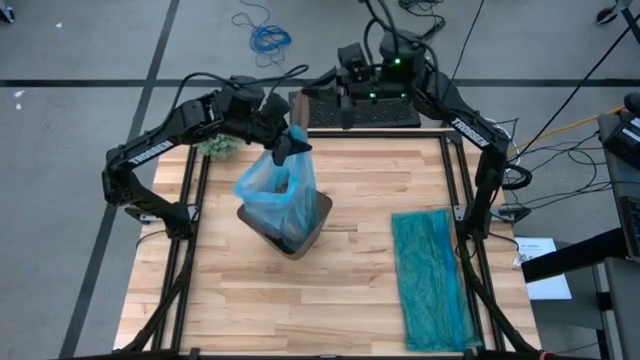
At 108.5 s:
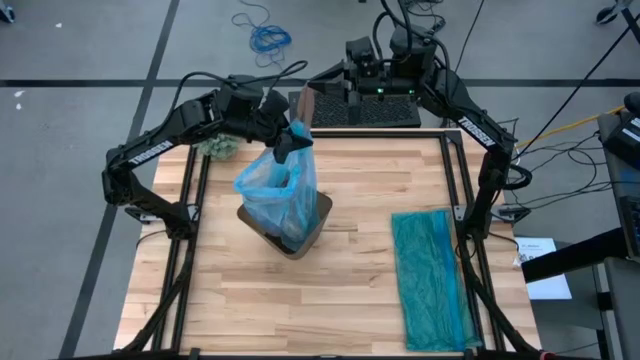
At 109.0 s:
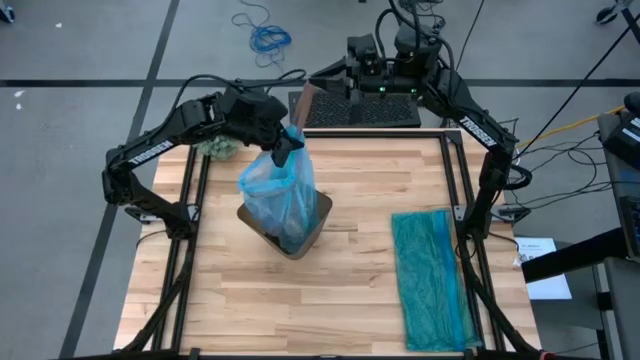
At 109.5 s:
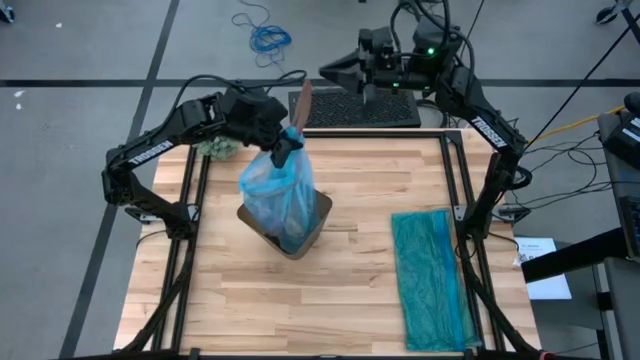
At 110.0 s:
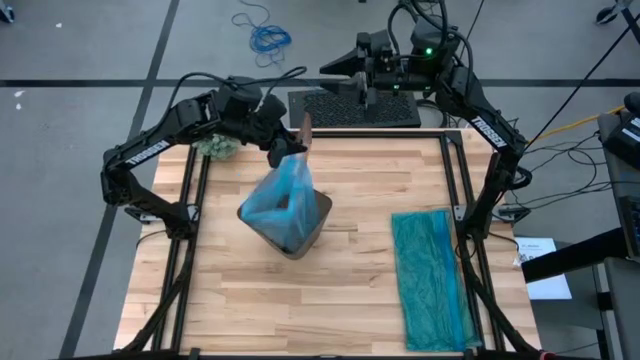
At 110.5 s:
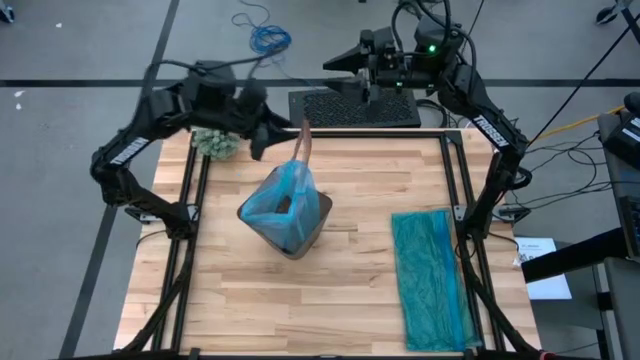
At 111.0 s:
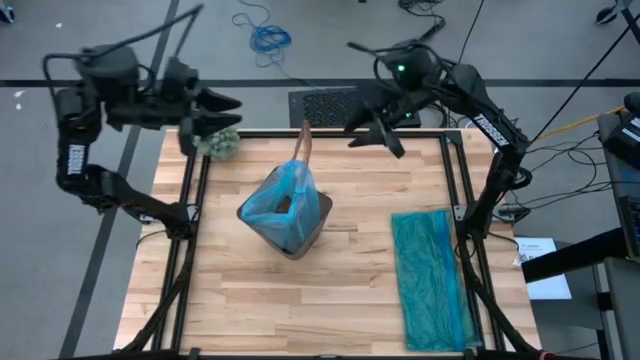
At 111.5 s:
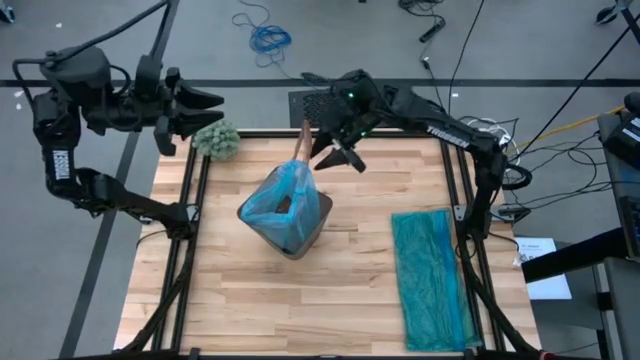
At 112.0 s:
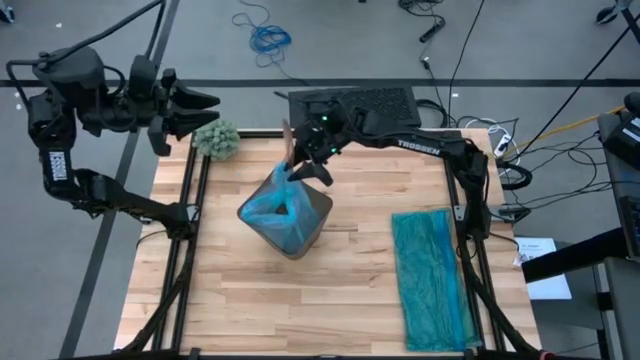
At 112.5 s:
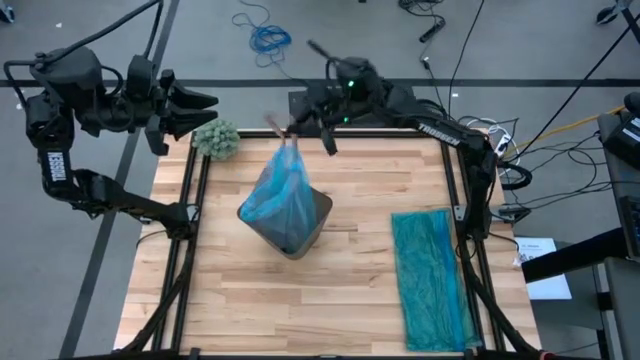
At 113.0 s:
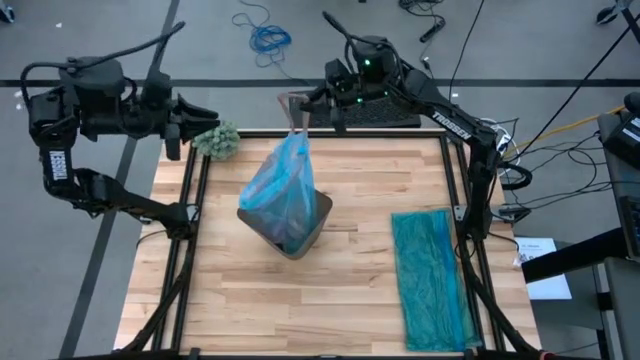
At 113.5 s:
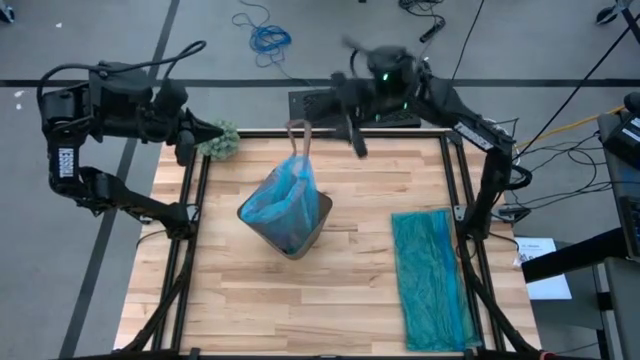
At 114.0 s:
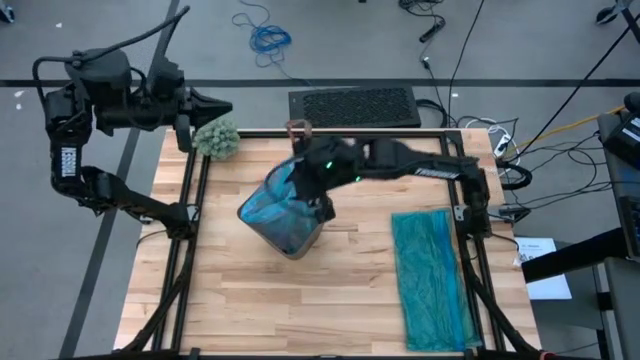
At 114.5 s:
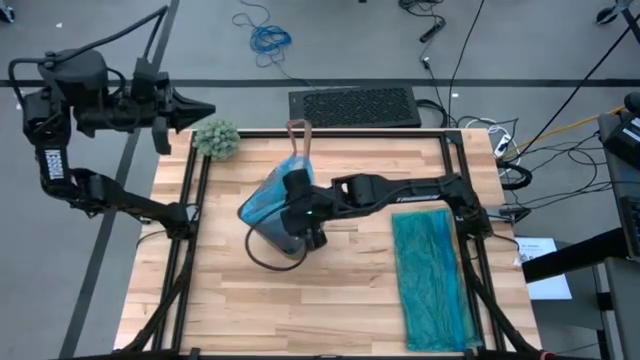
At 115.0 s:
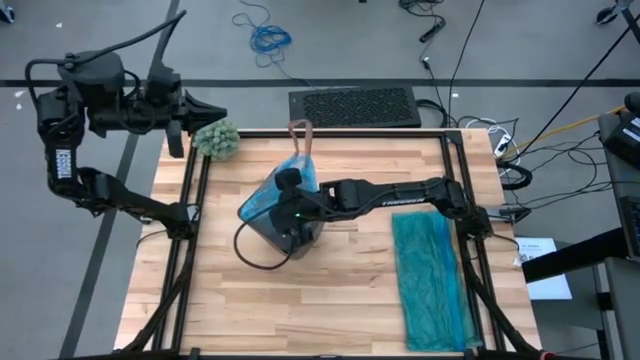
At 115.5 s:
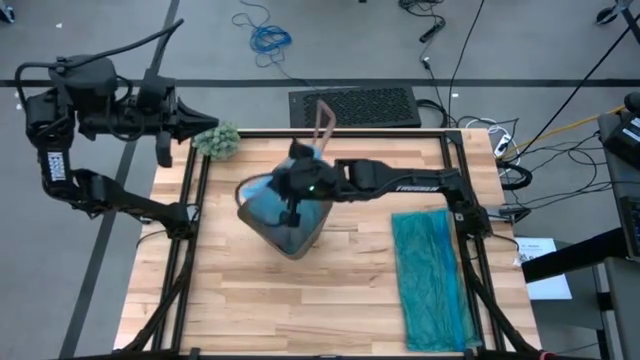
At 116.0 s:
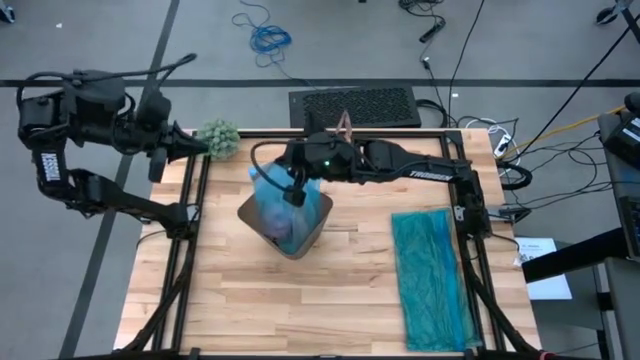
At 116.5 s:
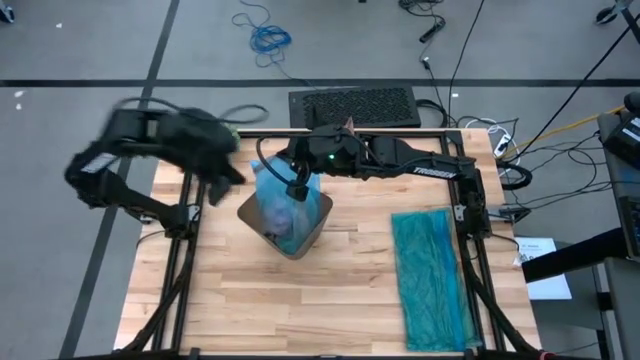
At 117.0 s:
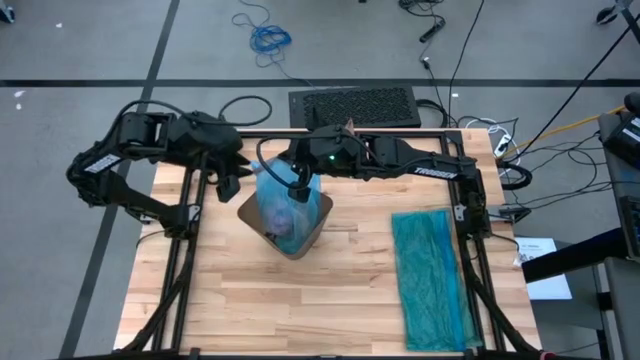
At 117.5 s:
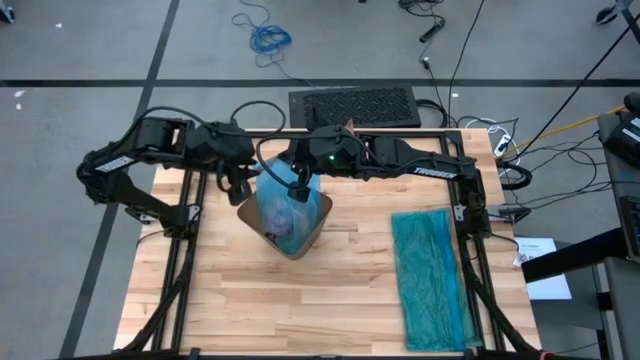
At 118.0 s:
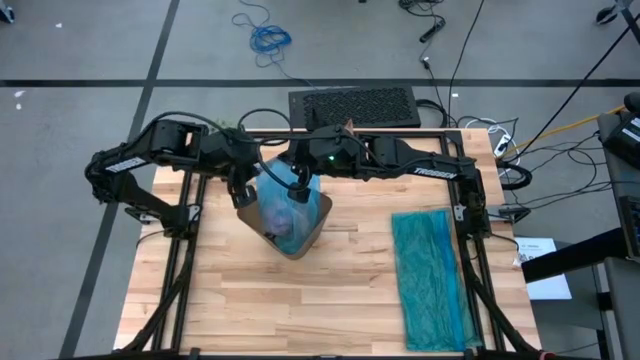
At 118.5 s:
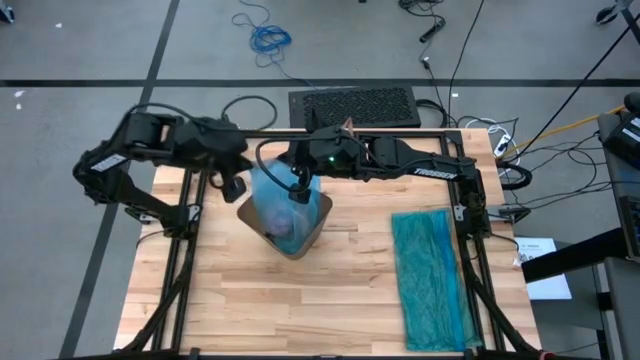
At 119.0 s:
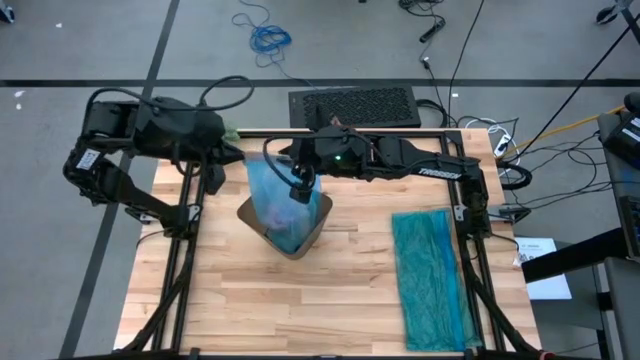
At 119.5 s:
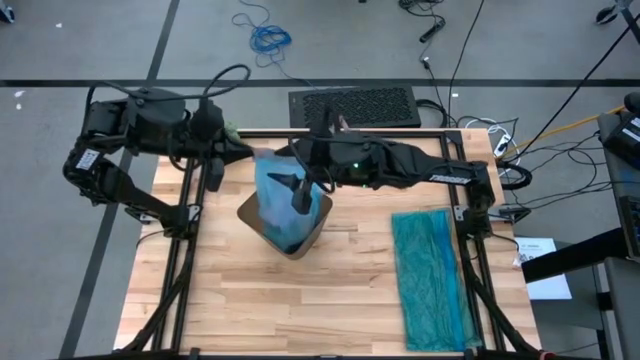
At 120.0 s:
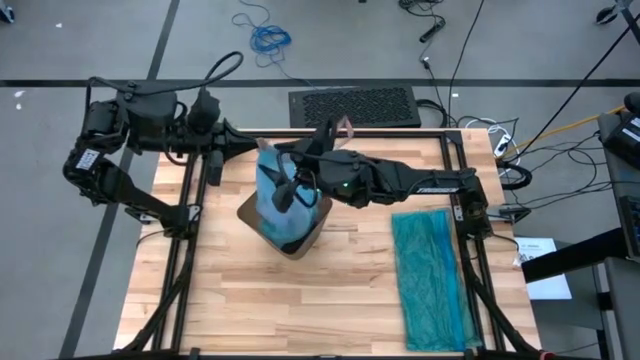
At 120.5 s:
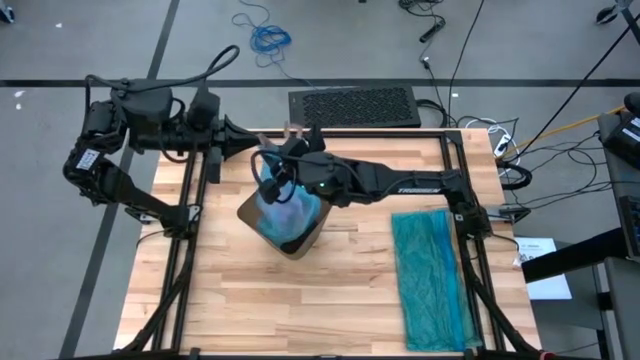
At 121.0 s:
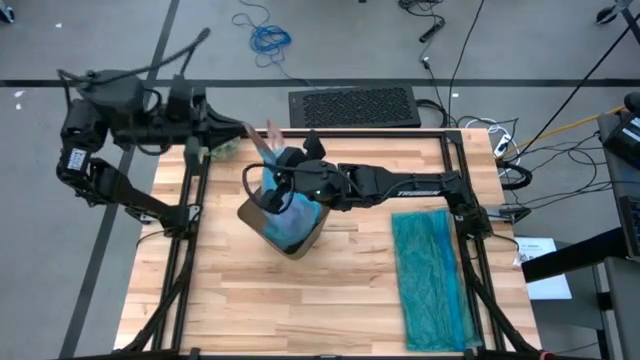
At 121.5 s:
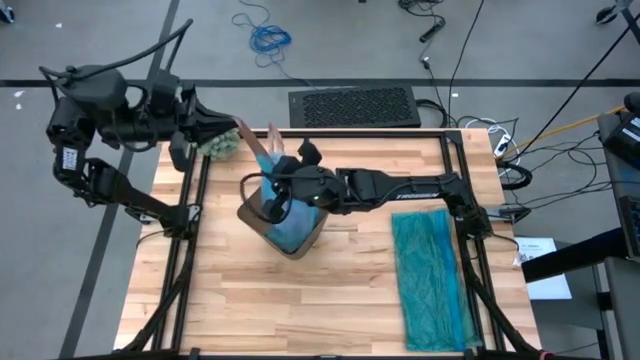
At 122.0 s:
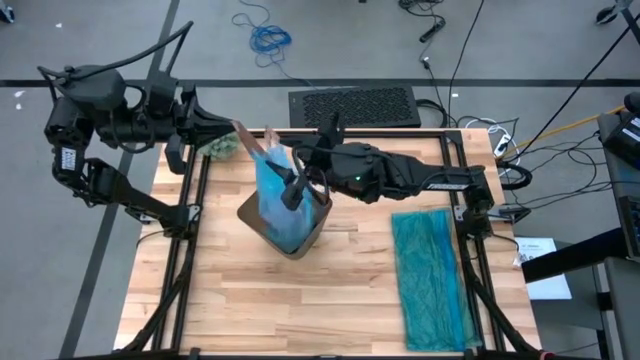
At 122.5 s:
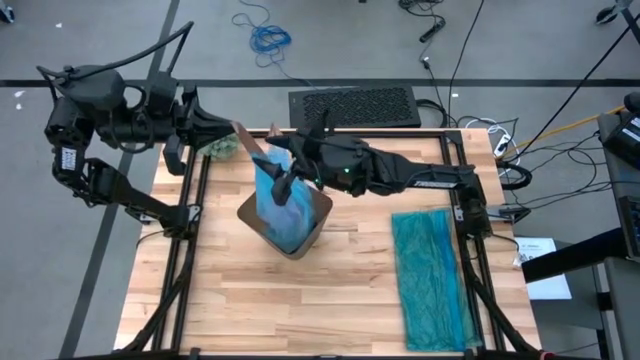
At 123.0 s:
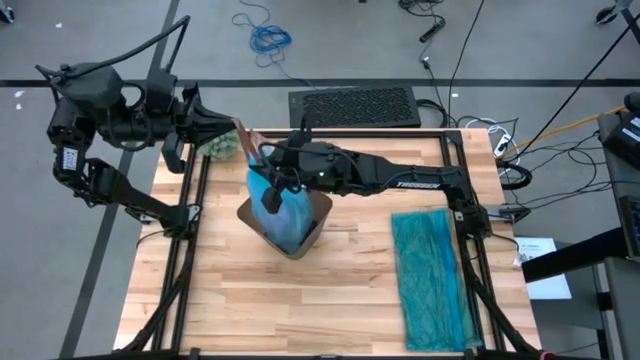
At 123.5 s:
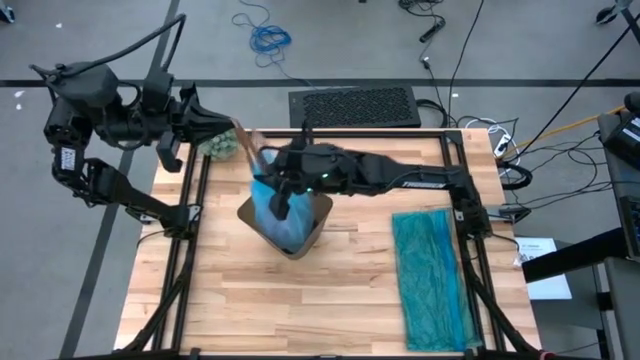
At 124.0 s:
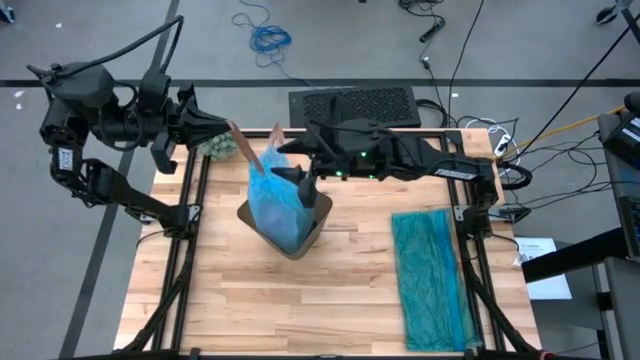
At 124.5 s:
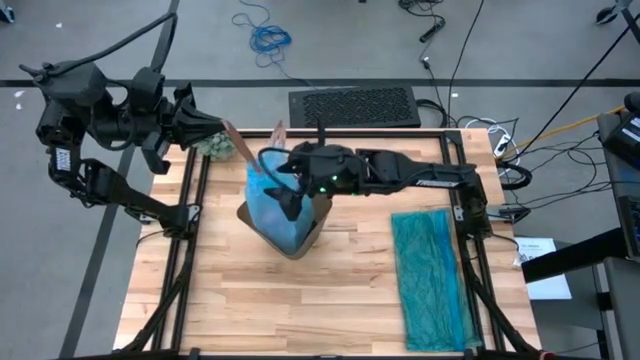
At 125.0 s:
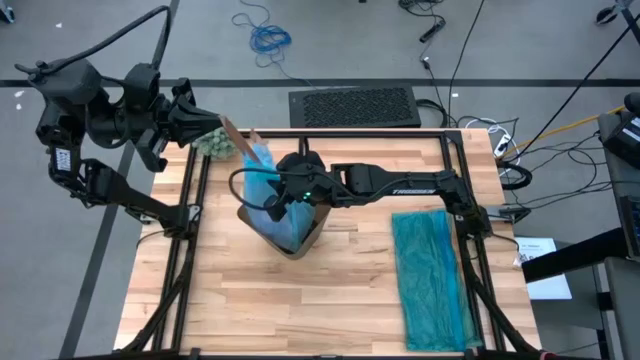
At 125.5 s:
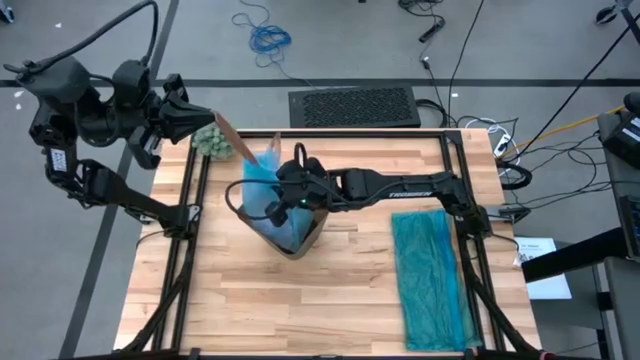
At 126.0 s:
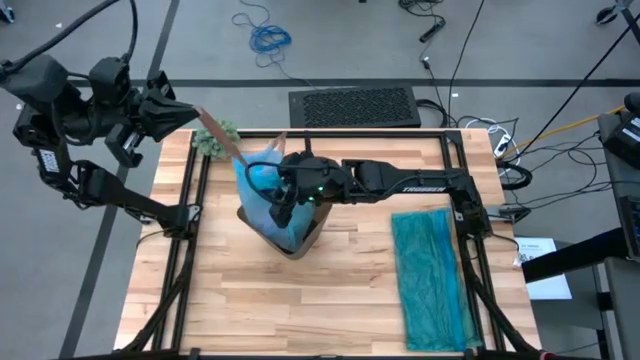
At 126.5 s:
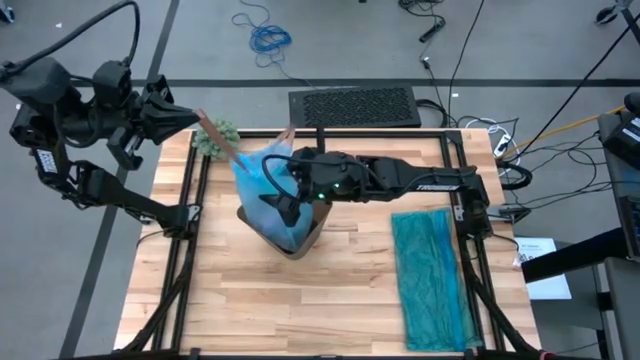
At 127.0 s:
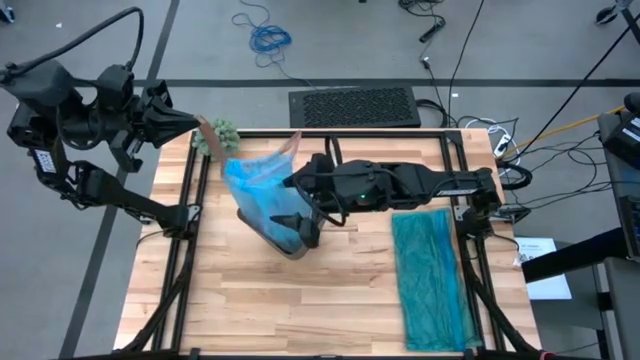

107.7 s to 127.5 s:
Task: place trash/remove bag and relplace
Close the blue trash bag
